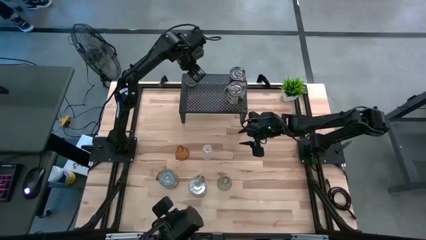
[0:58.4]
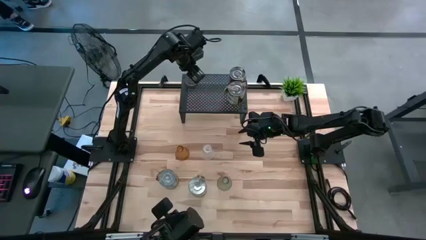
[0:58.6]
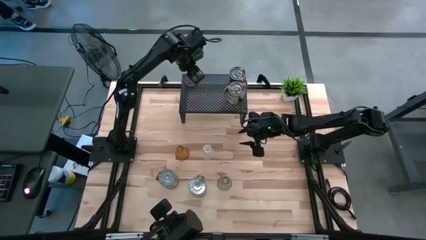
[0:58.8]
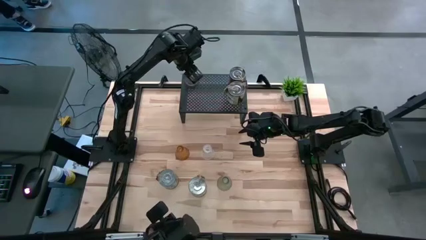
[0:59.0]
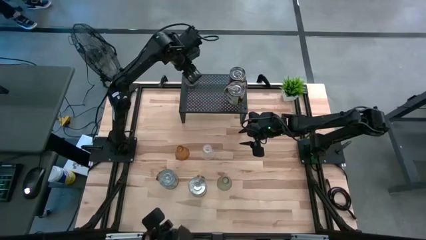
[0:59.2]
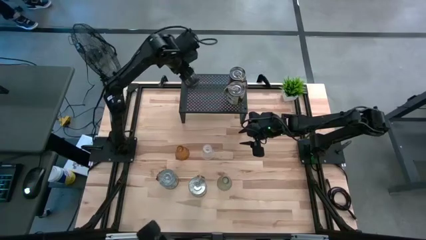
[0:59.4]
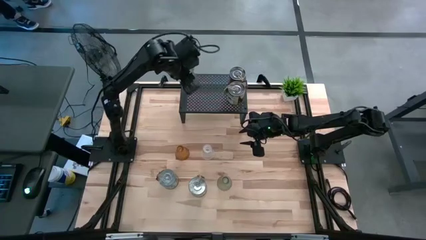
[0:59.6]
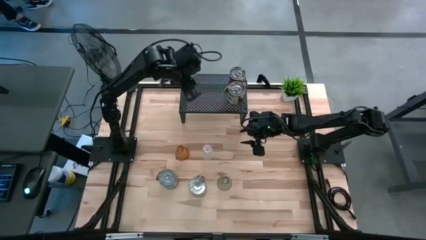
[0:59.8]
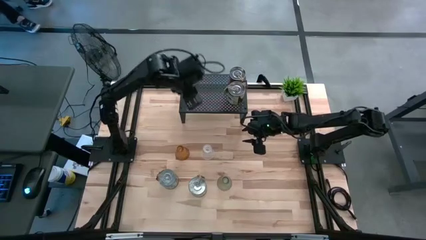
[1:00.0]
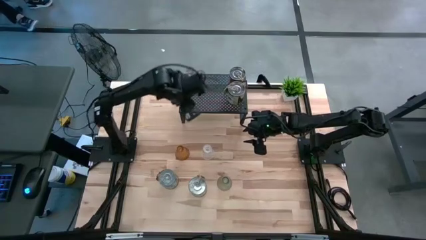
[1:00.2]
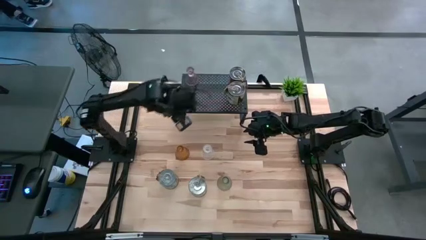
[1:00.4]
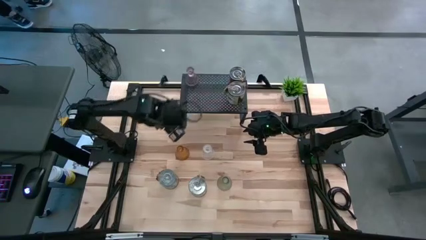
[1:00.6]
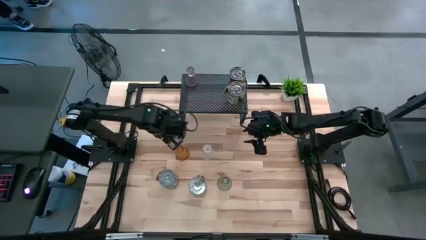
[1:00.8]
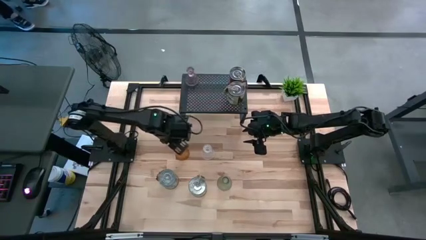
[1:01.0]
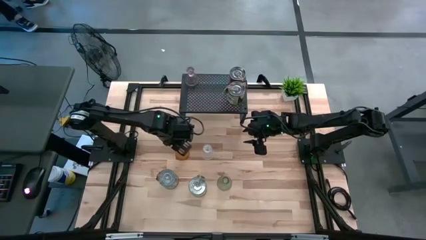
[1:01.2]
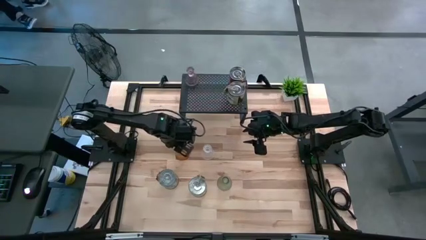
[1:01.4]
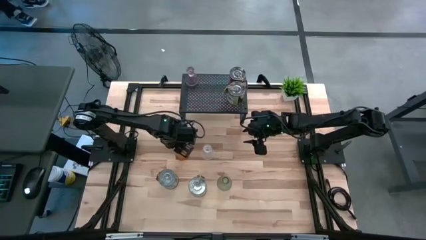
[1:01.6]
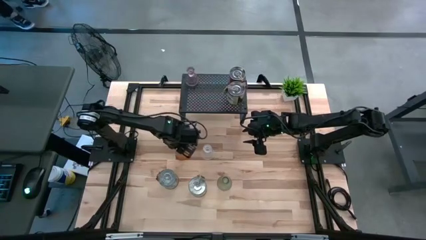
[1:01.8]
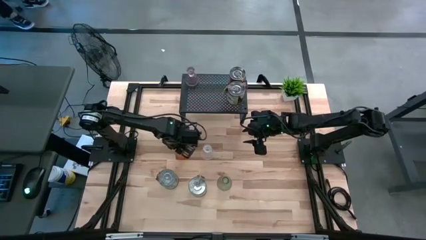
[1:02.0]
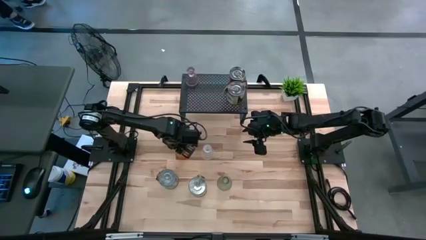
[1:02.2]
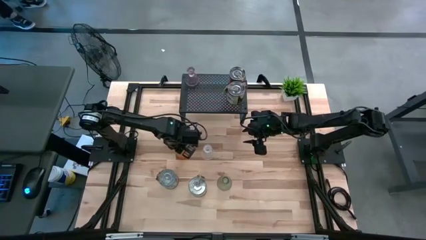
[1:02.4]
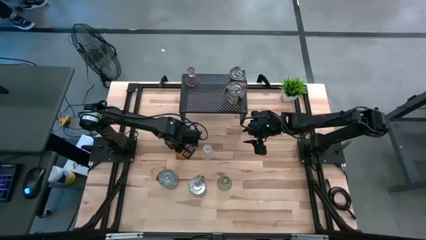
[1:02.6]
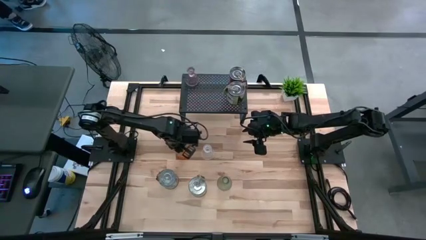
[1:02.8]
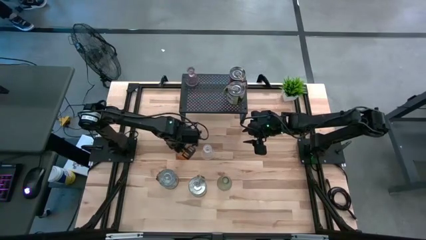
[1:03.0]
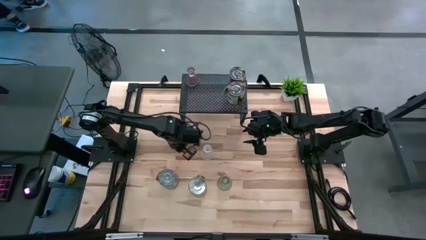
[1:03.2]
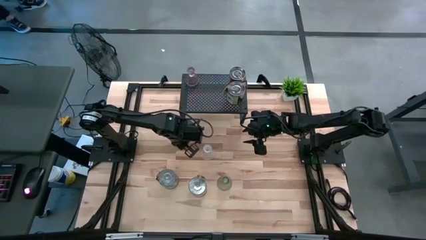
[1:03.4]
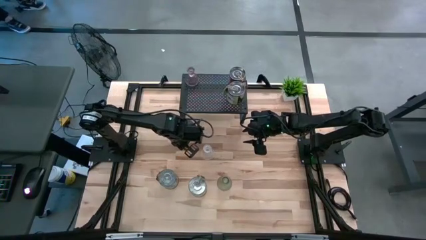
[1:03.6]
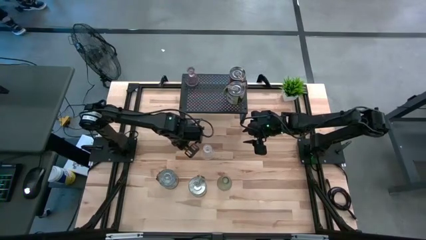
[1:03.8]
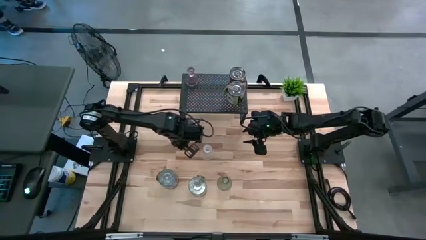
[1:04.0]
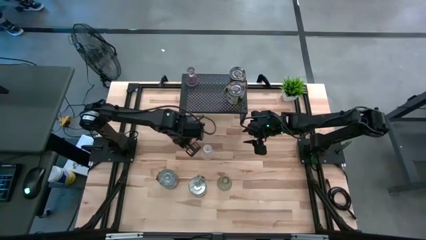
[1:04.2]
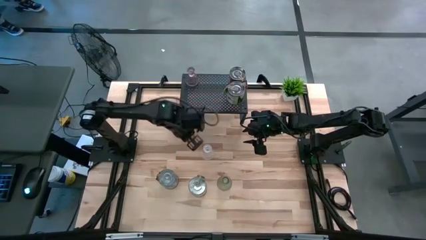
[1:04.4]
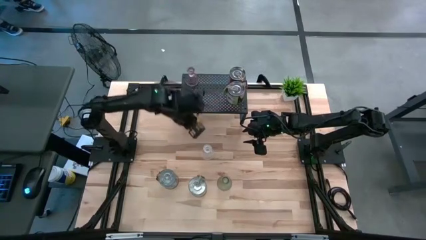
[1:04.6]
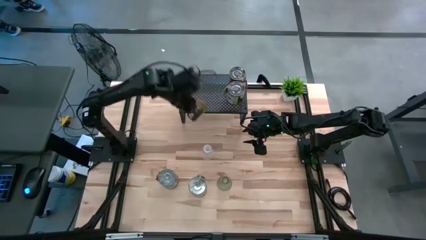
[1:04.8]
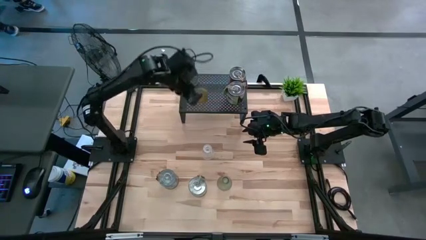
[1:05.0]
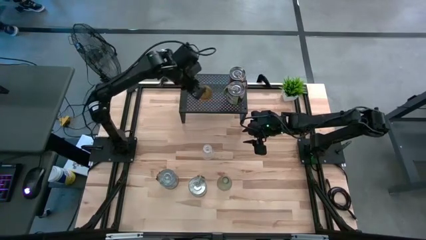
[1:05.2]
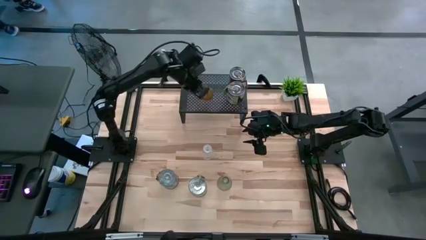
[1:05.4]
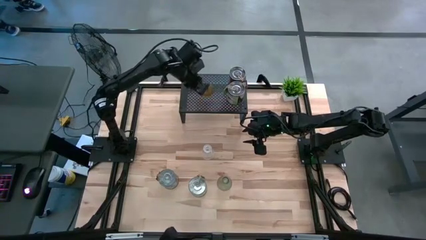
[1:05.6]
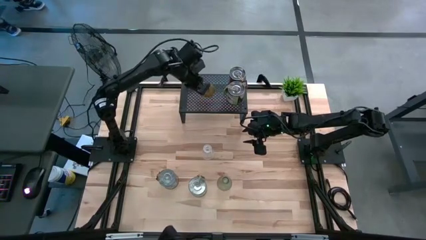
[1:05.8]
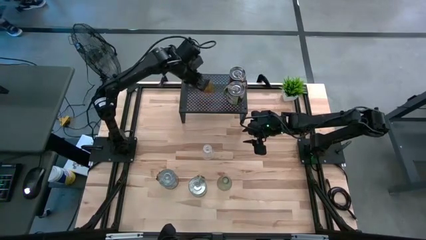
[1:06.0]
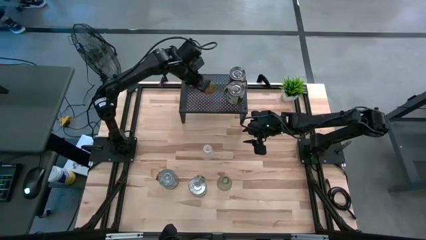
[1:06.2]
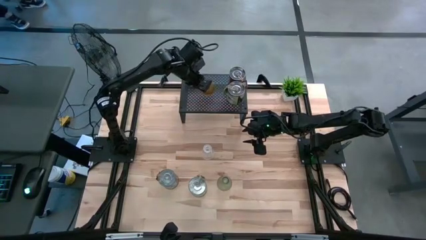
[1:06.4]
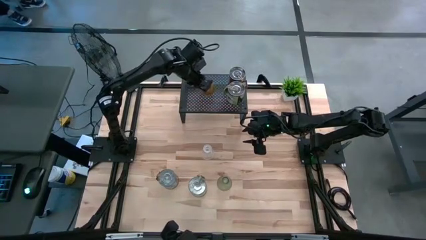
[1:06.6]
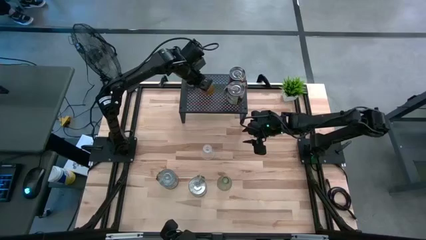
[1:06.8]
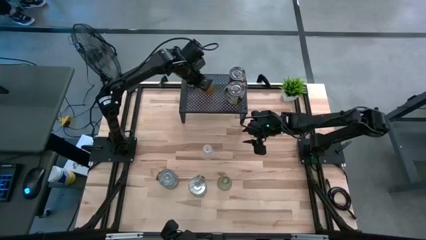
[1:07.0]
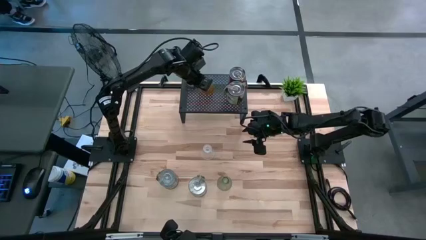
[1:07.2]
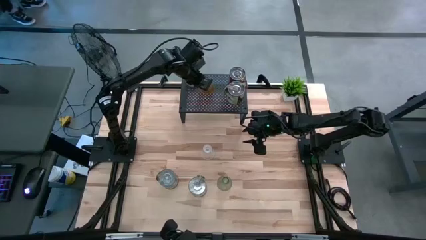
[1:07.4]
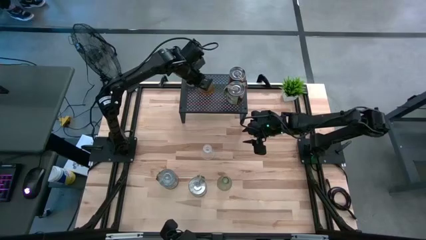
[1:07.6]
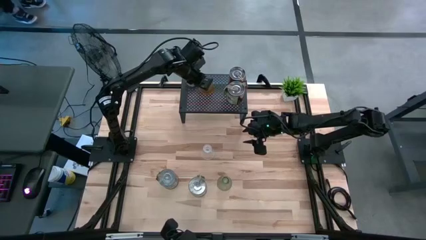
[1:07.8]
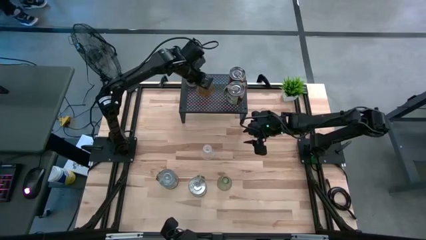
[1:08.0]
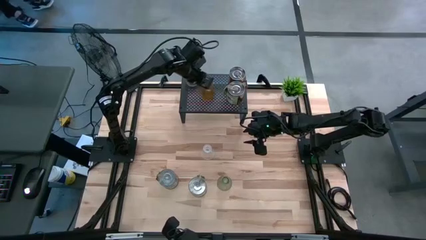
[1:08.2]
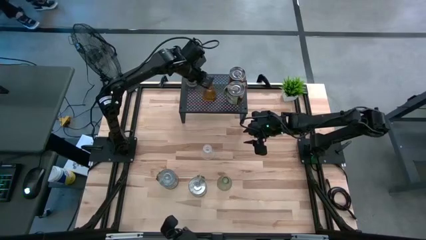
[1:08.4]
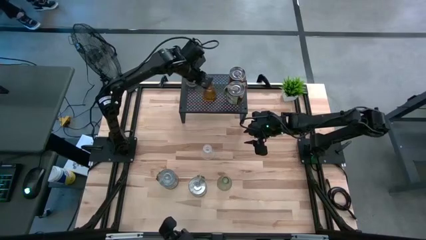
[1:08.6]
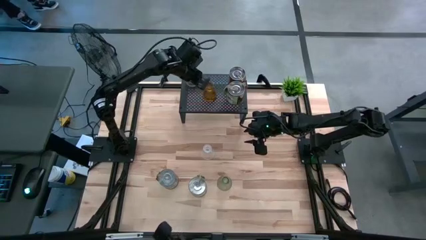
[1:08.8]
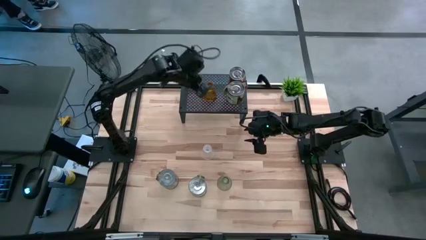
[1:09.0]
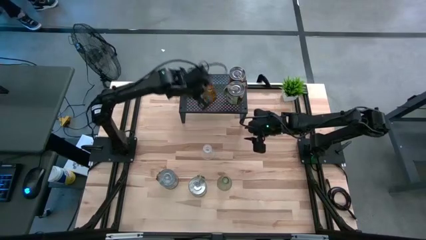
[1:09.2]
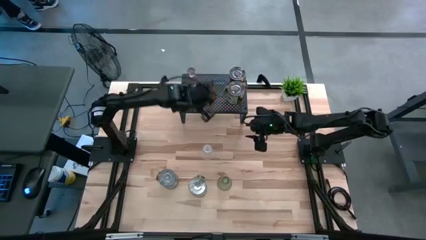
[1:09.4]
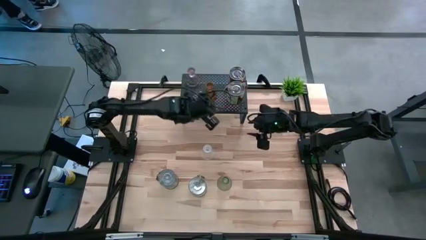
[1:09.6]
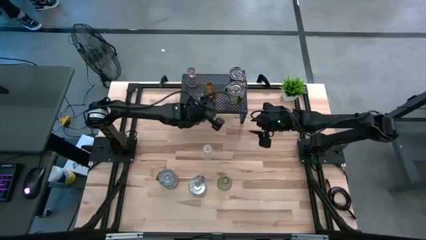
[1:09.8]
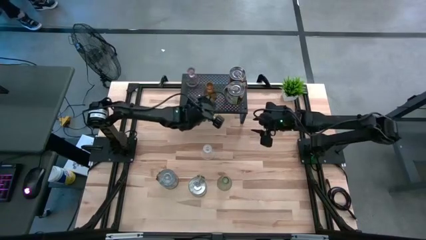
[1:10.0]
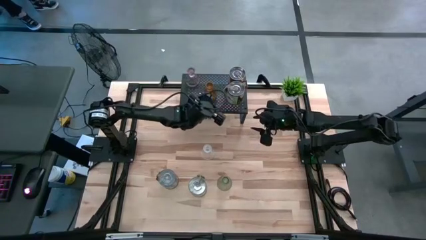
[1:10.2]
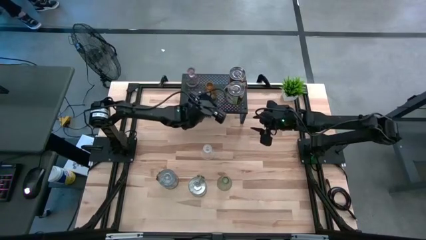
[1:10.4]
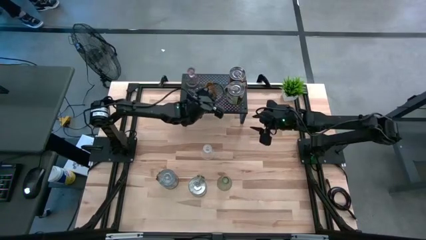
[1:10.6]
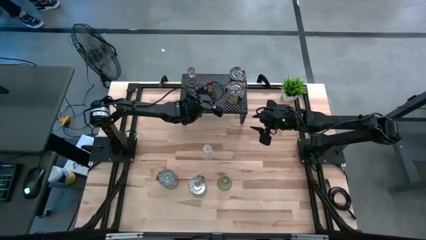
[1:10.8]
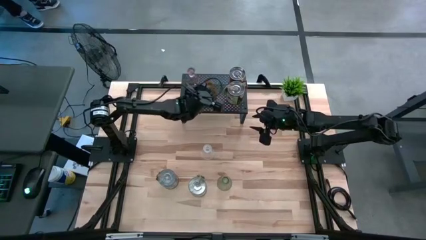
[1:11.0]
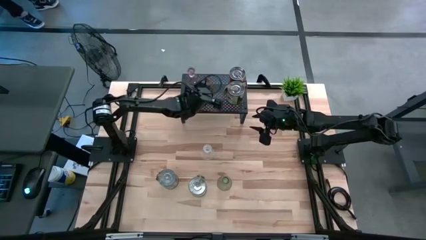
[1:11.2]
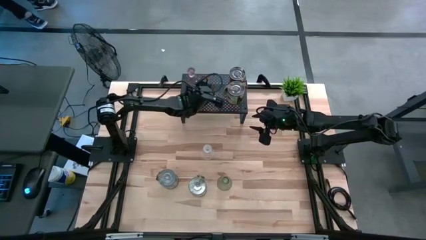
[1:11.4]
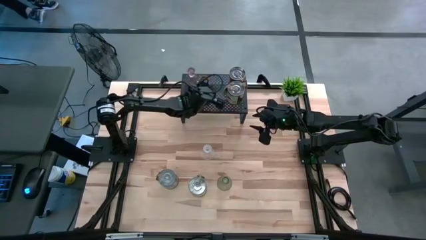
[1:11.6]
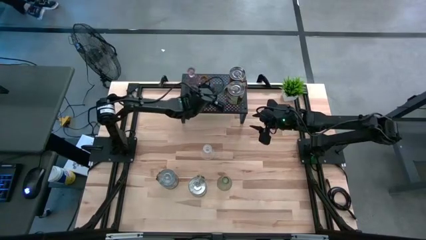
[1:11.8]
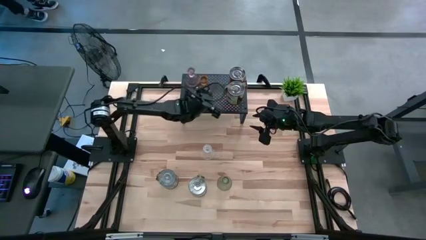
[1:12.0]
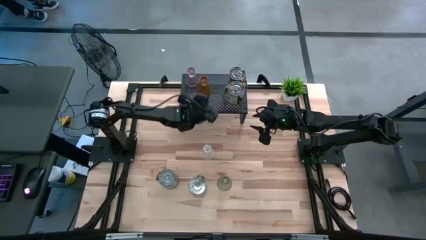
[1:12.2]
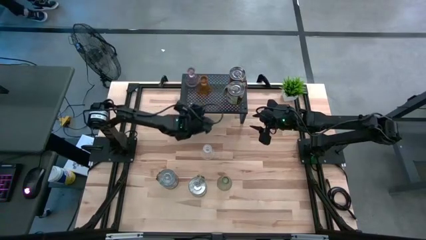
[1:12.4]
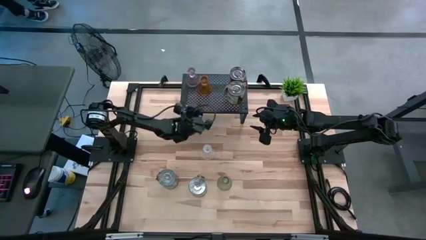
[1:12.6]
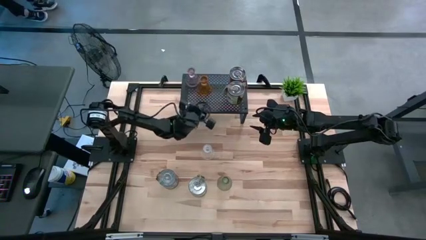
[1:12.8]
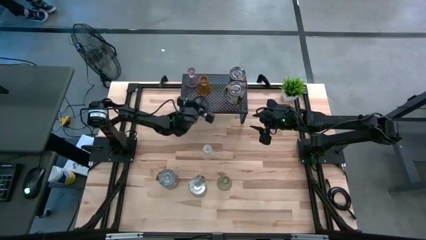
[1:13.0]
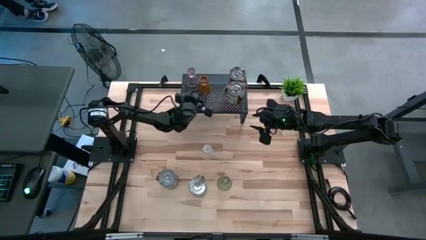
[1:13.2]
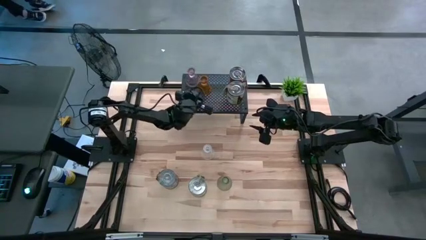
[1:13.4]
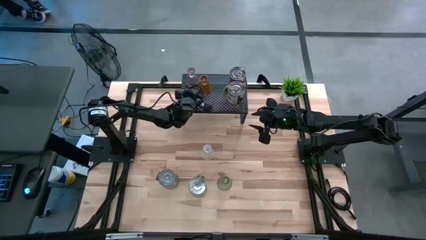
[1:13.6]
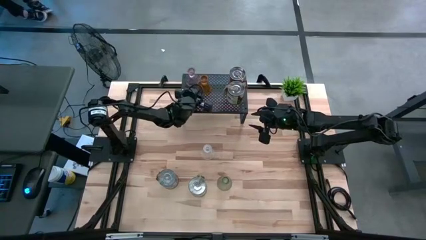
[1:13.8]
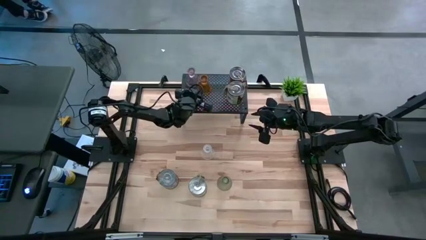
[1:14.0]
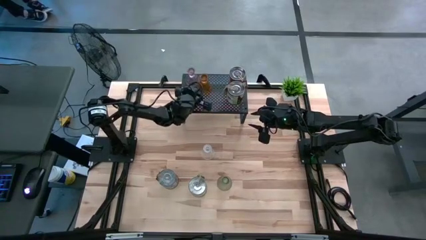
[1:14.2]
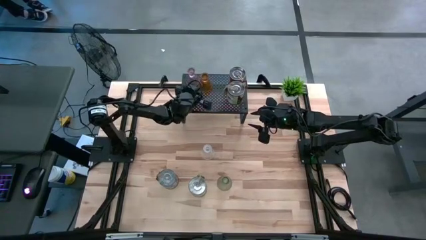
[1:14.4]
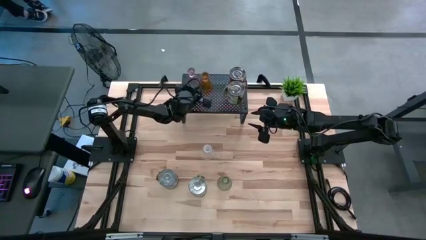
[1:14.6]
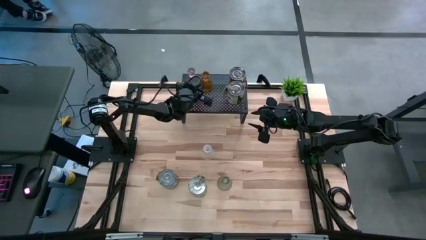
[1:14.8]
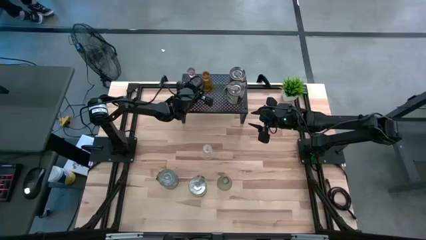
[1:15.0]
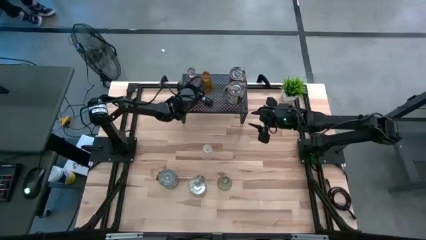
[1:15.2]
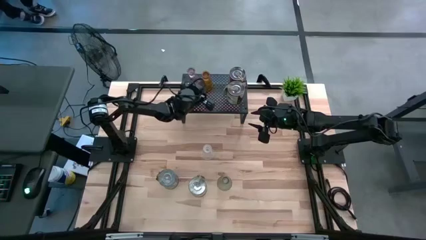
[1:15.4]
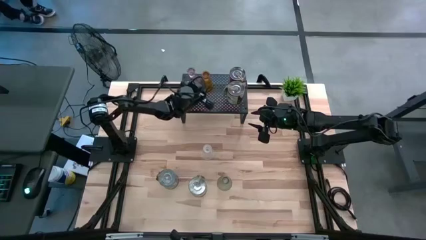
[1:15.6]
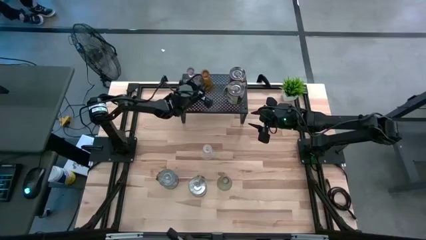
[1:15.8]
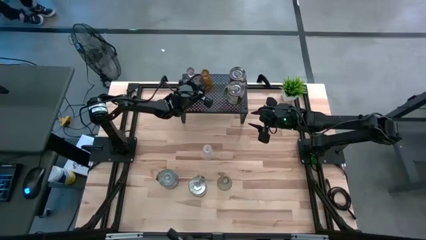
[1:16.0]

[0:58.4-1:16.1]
Task: Pick & Place candle stick holders
Put the yellow glass candlestick on the shelf aligned with the other candlestick
